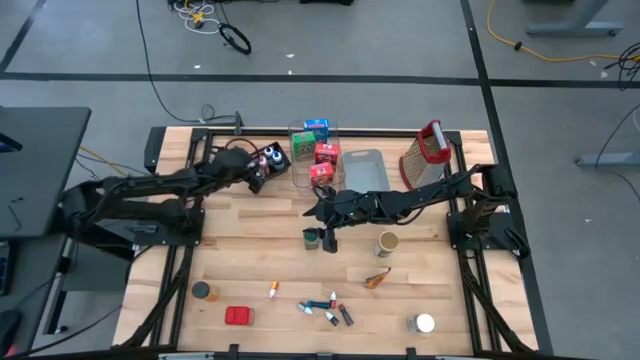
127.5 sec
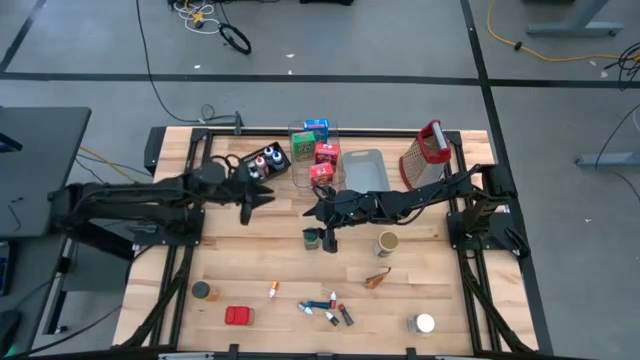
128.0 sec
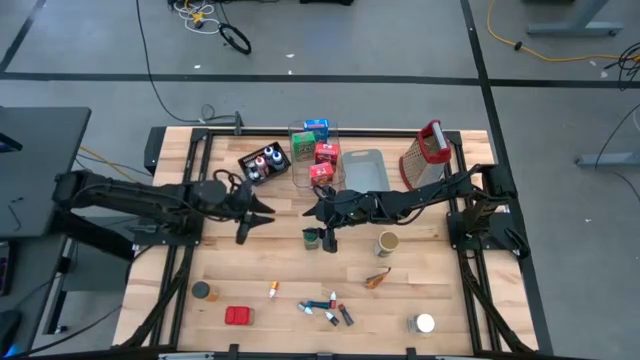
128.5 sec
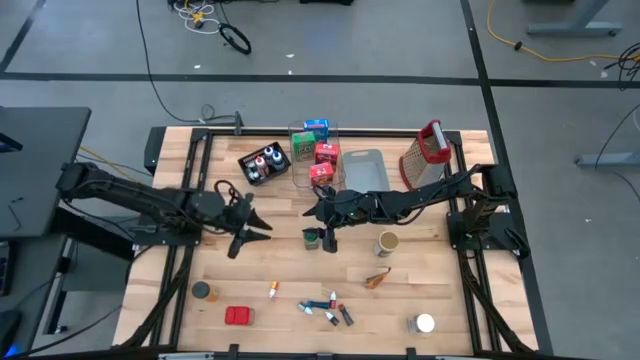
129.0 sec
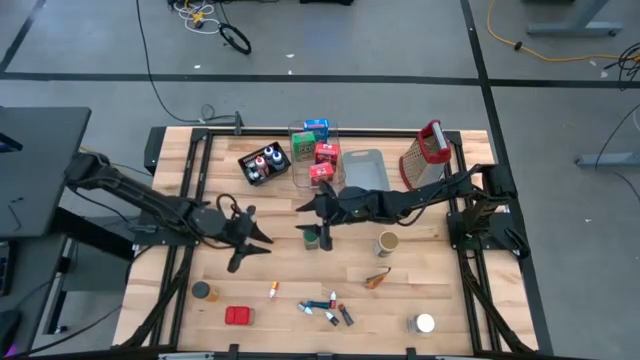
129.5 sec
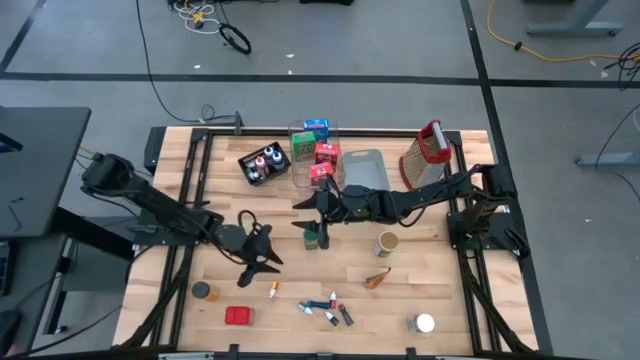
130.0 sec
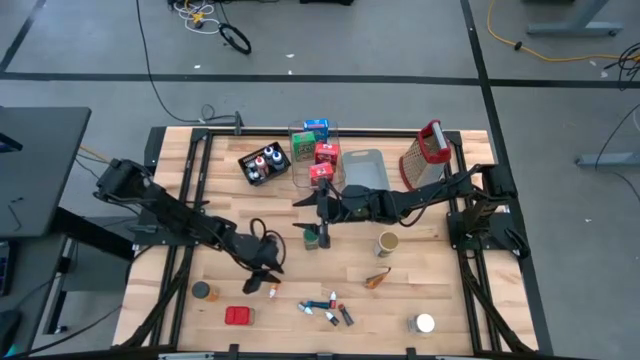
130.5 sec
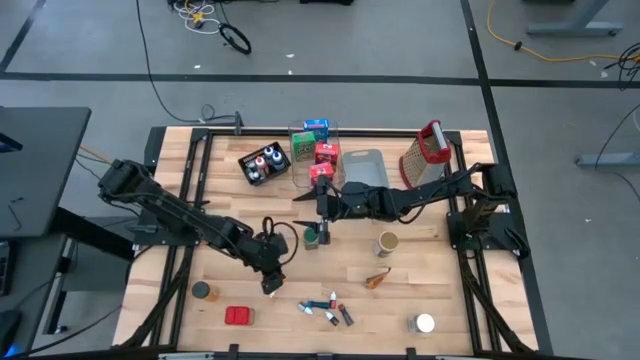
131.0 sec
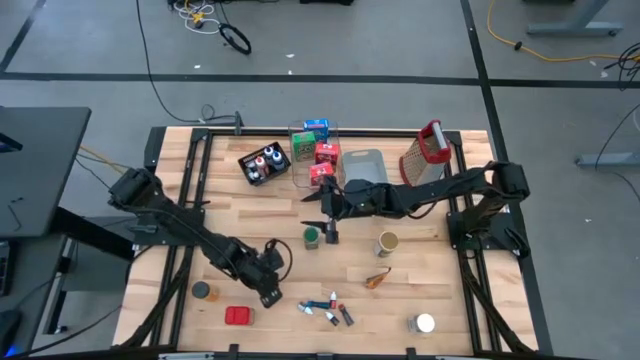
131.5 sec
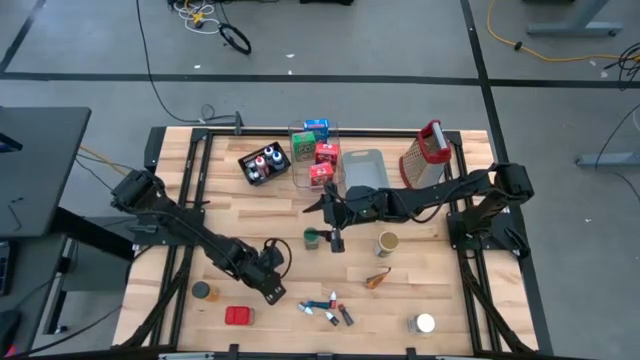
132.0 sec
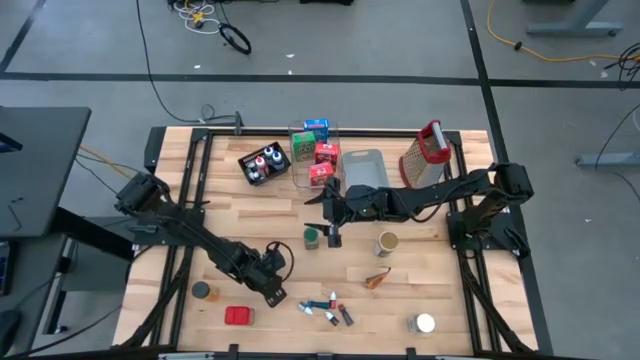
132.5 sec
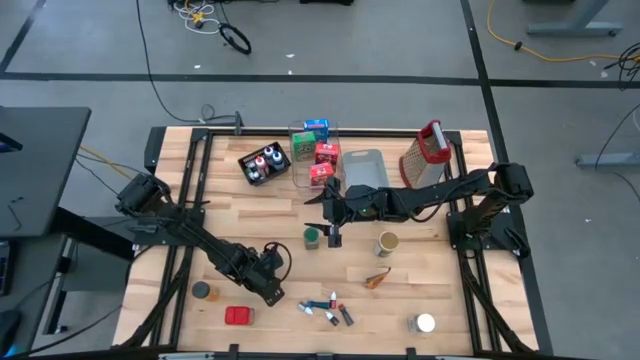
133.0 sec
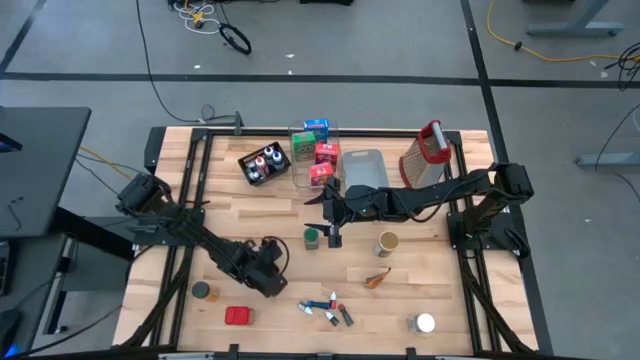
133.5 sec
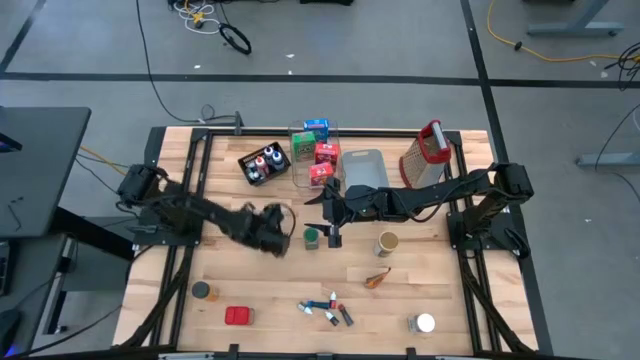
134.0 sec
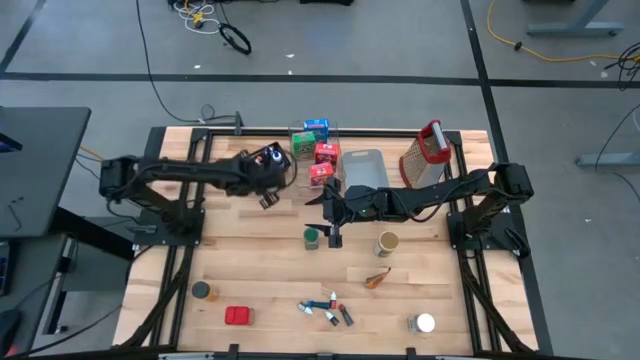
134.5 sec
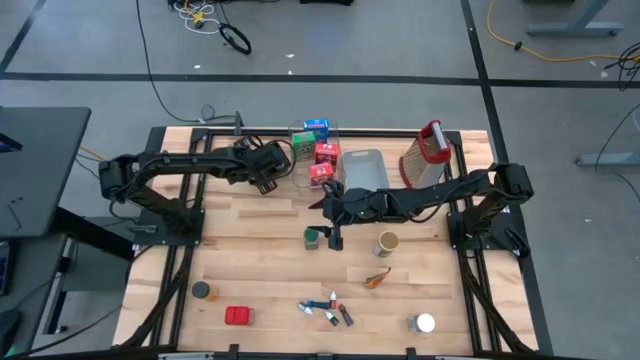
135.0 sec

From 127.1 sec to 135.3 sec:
Task: Pick & Place Kitchen Items
Put the small yellow food coloring bottle into the black bin

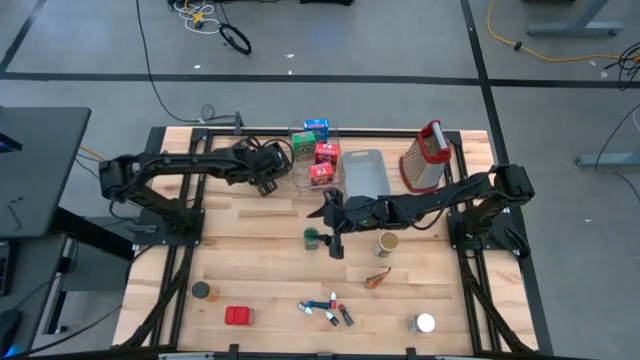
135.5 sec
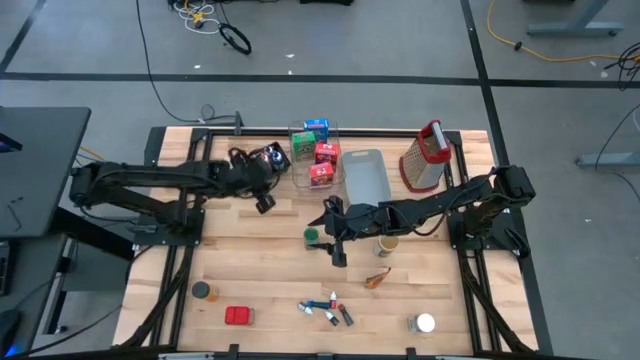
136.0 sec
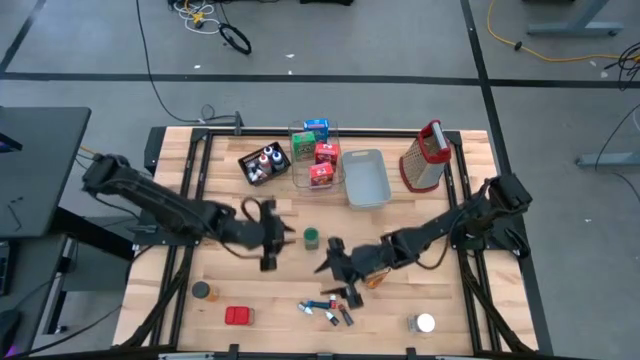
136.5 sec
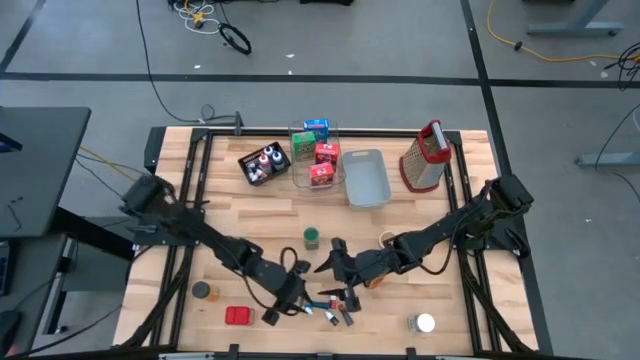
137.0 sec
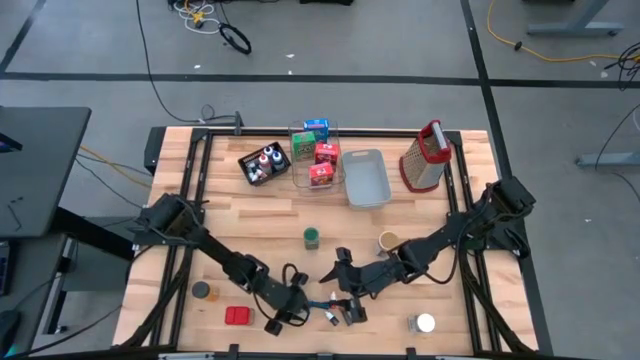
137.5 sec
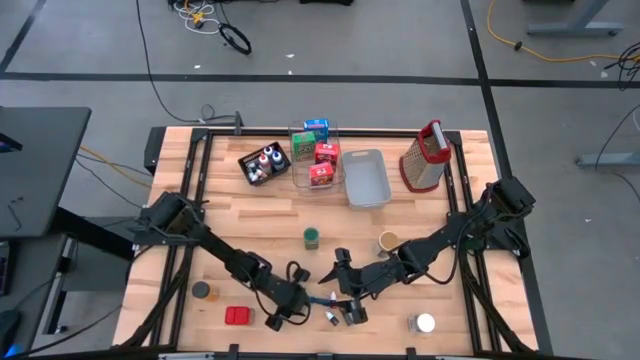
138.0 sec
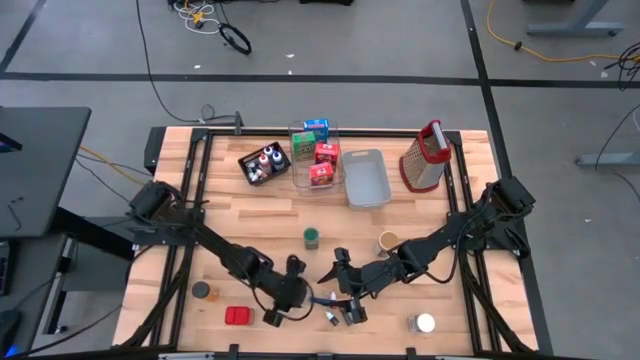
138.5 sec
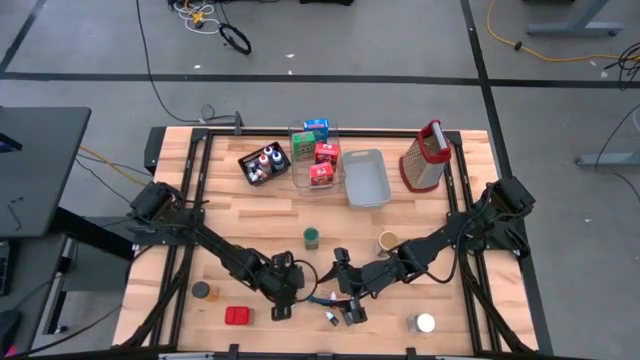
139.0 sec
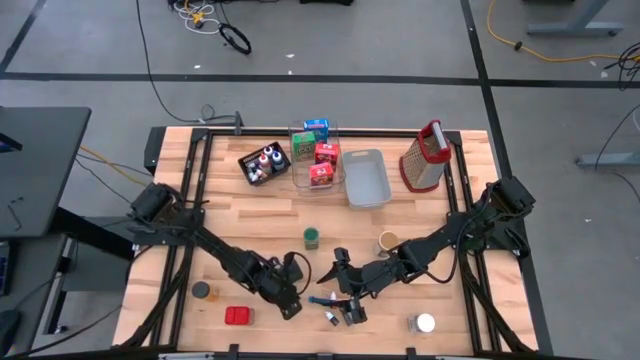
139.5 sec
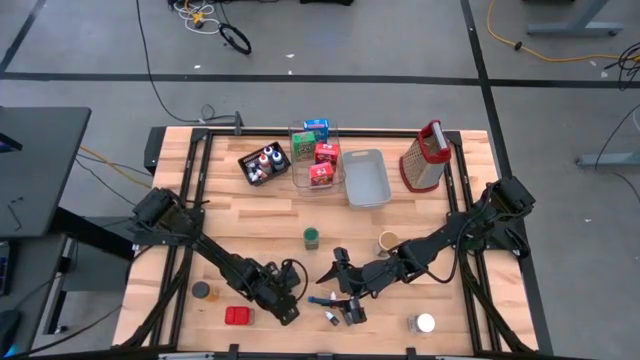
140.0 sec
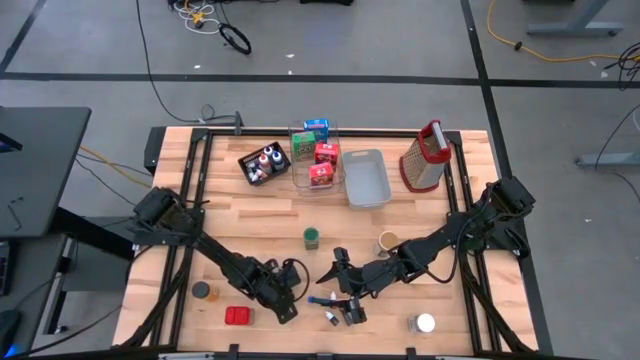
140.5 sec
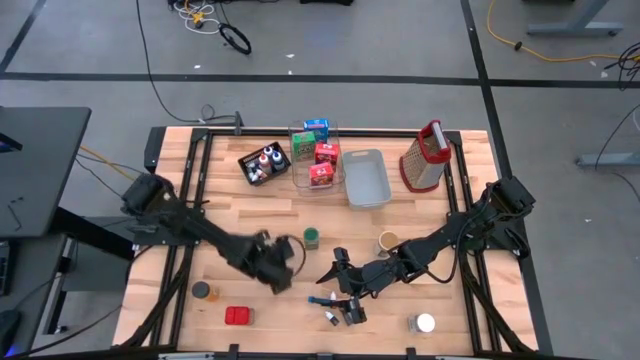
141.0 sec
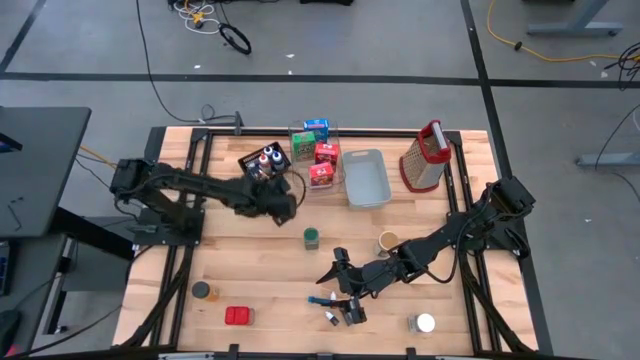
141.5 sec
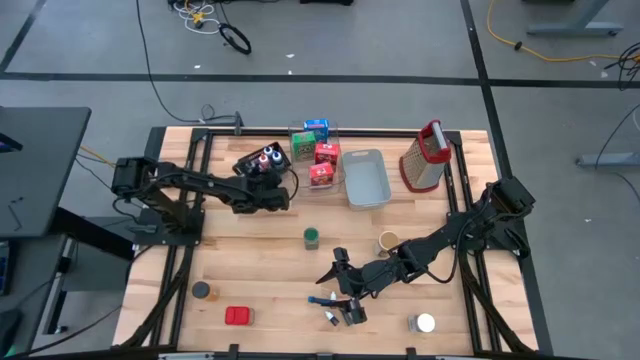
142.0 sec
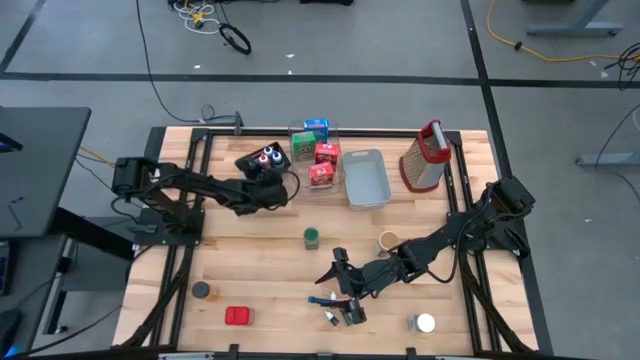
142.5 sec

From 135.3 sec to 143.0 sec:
Put the small dark green food coloring bottle into the black bin

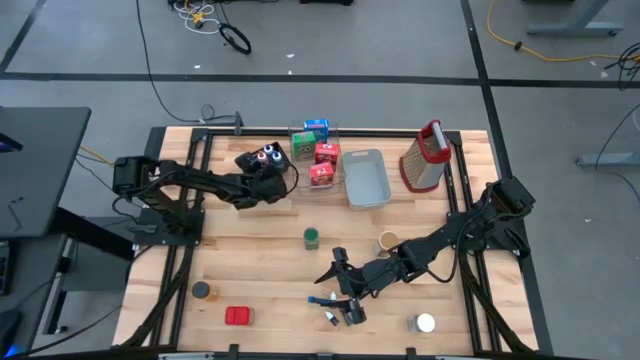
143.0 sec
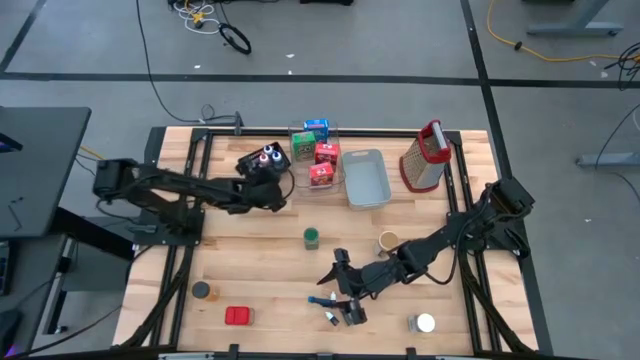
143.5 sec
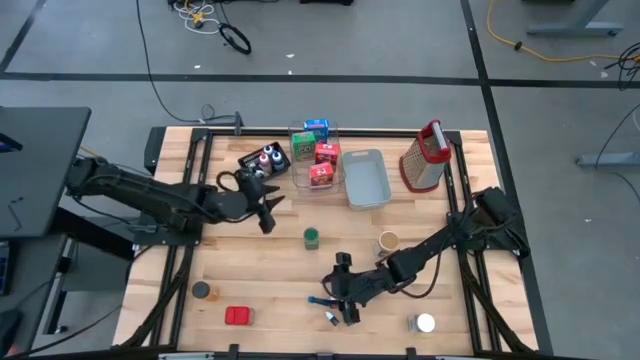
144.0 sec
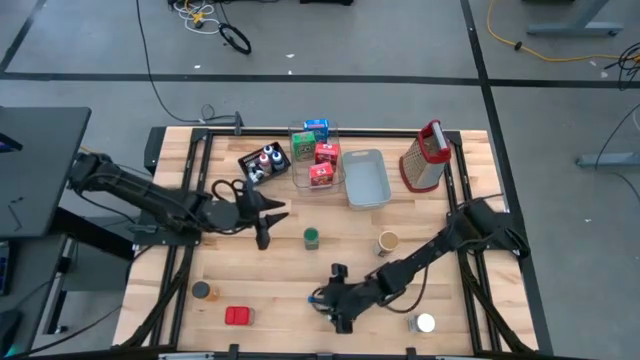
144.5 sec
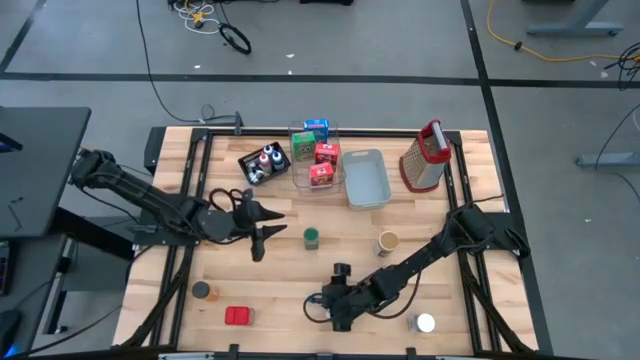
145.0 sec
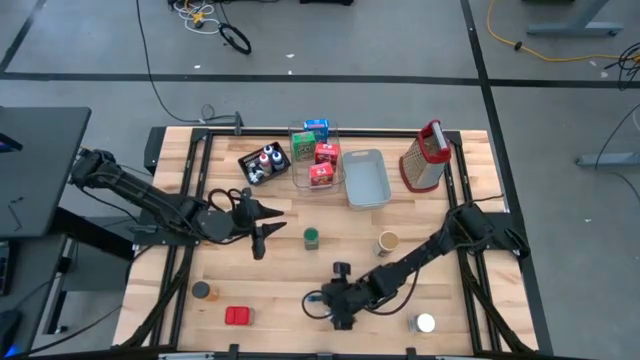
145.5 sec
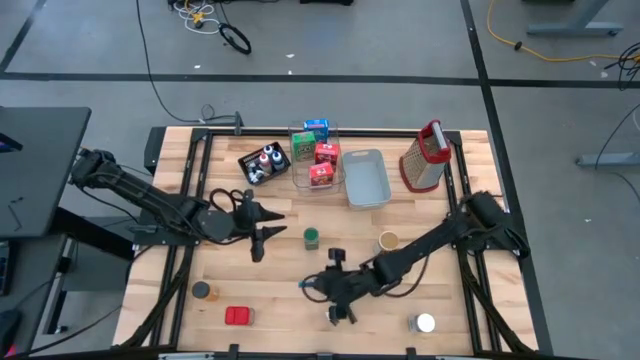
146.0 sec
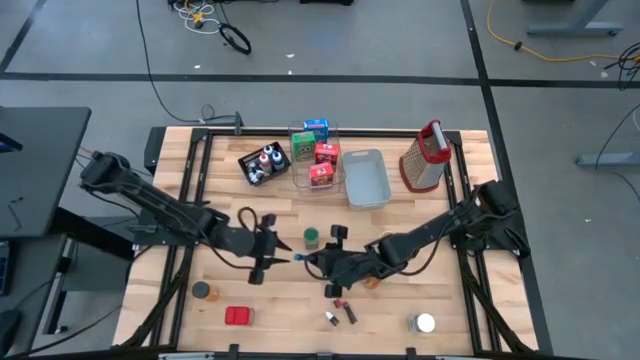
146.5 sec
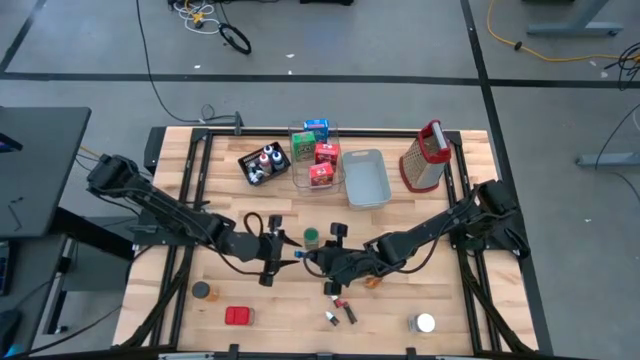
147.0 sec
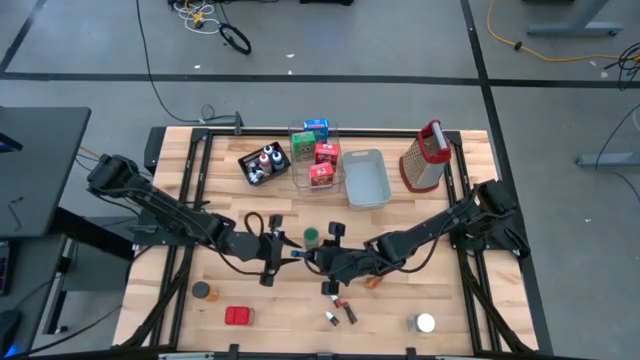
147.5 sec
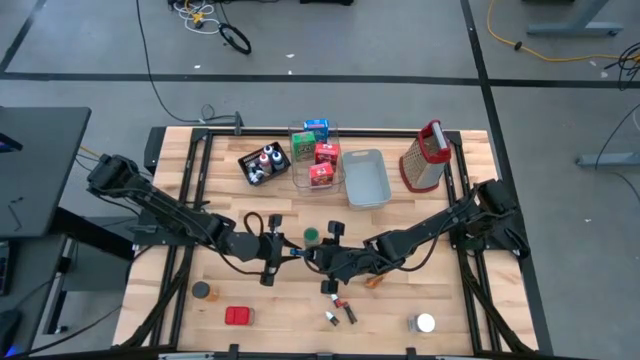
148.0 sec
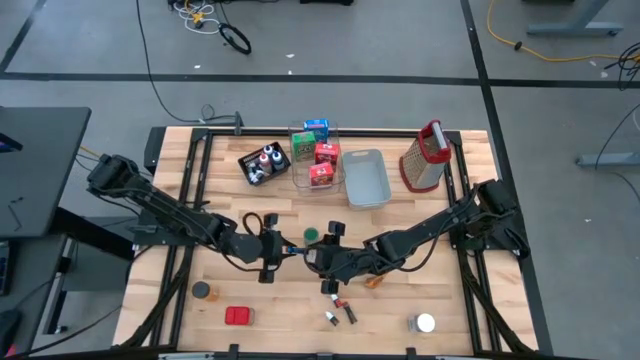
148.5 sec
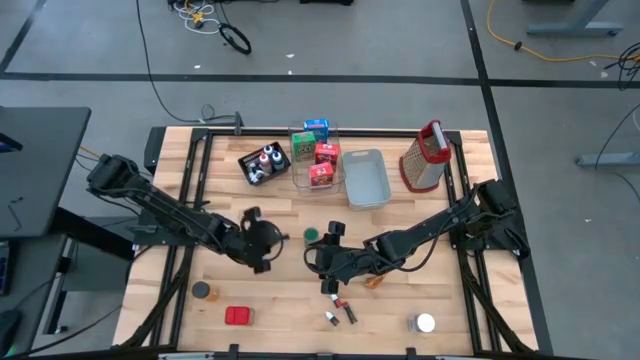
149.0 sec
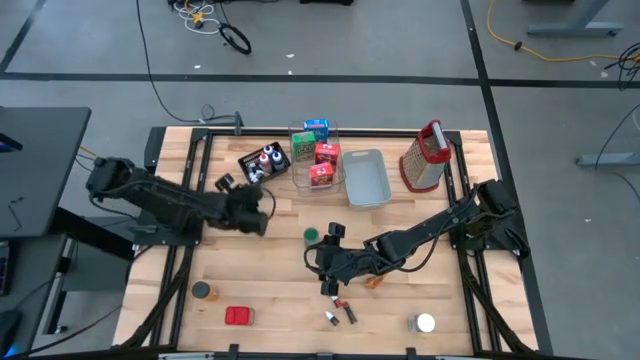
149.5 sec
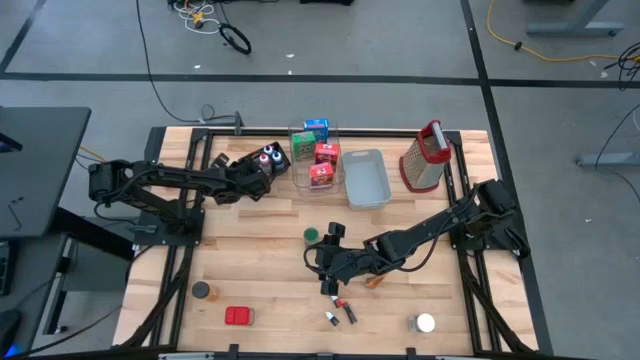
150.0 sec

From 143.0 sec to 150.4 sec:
Put the small blue food coloring bottle into the black bin
